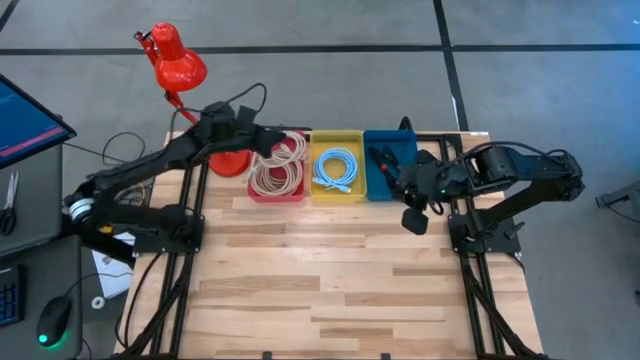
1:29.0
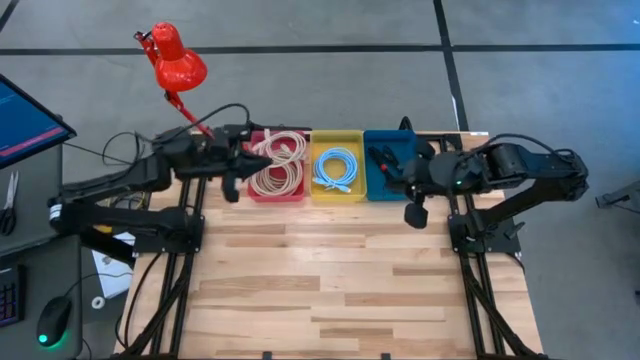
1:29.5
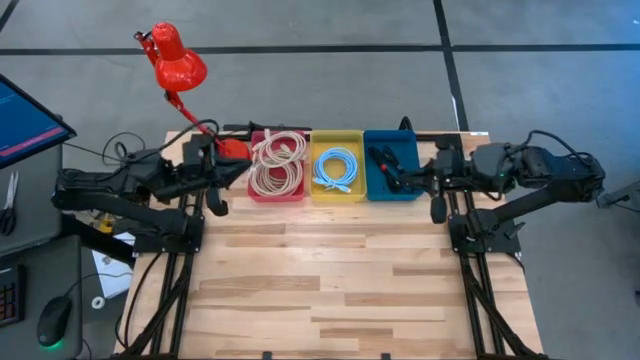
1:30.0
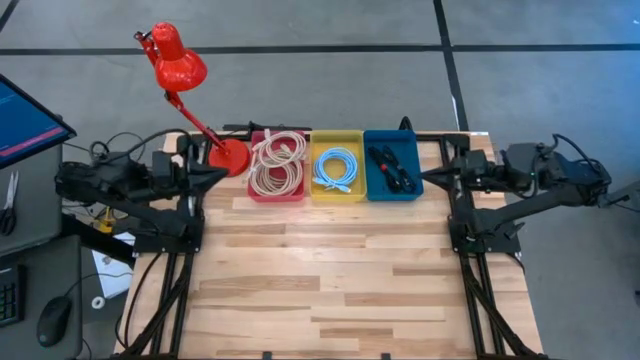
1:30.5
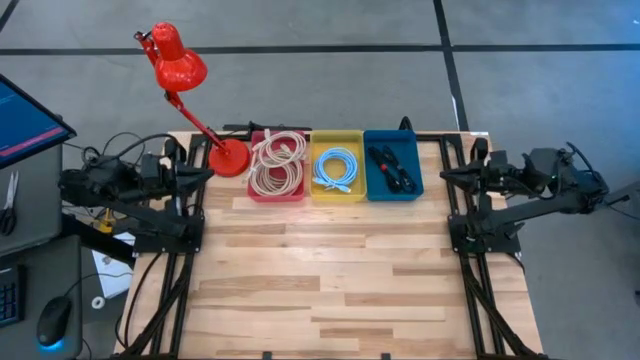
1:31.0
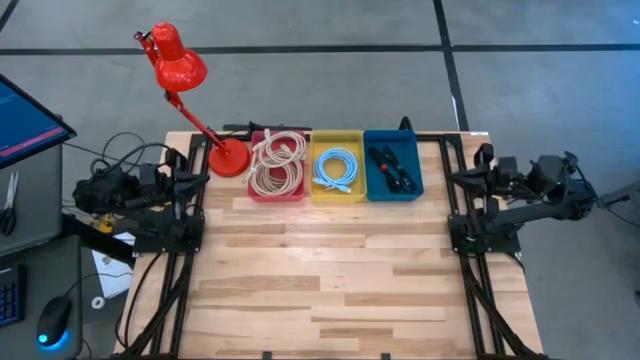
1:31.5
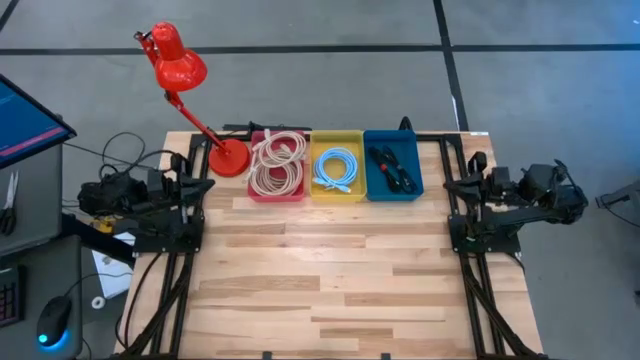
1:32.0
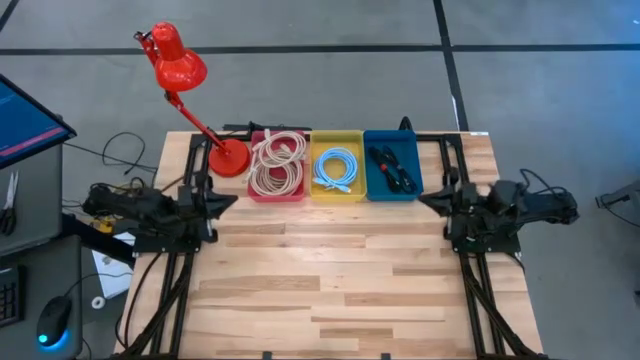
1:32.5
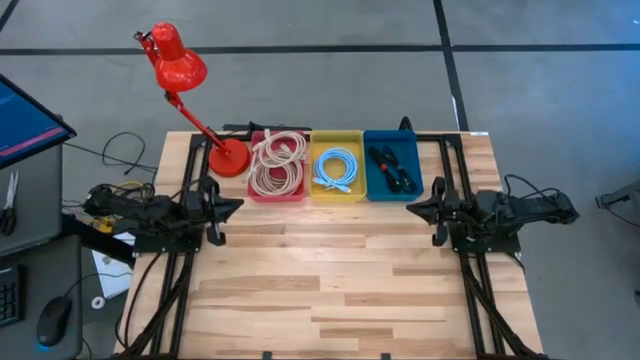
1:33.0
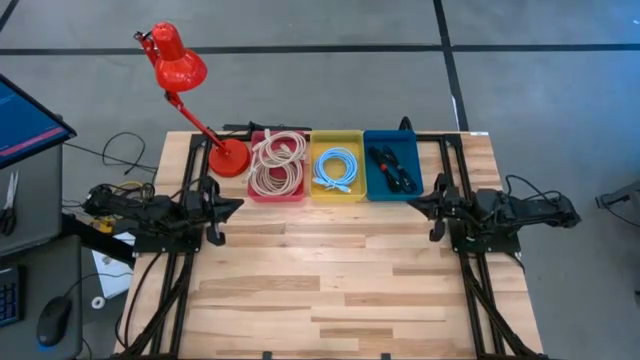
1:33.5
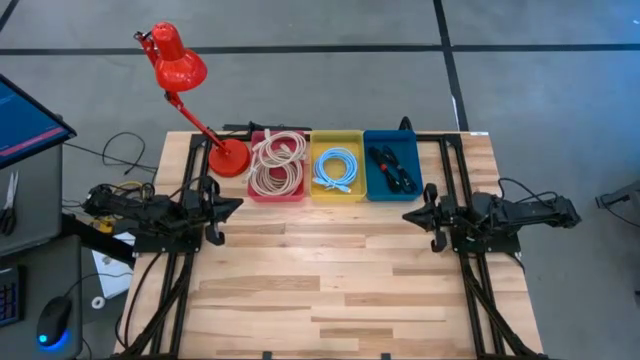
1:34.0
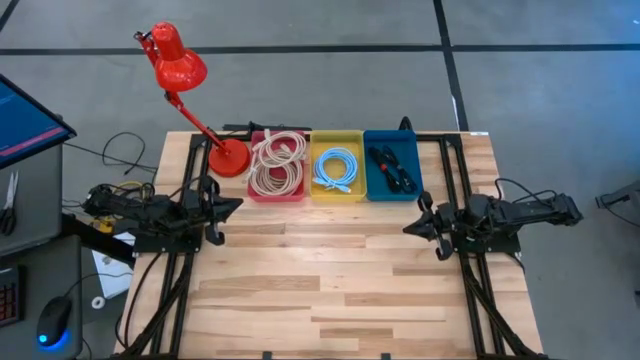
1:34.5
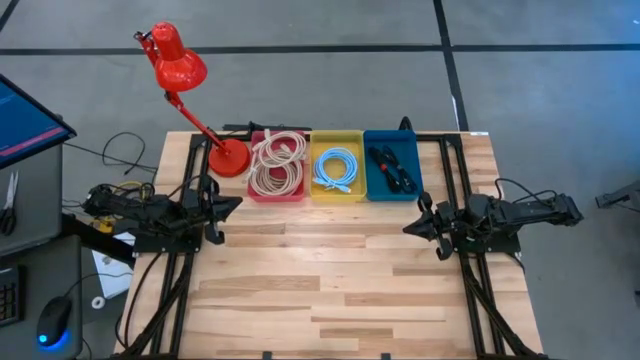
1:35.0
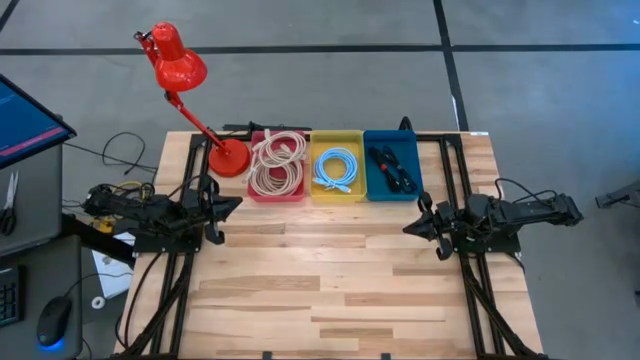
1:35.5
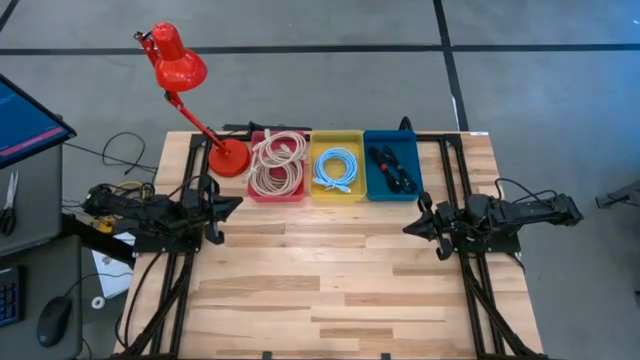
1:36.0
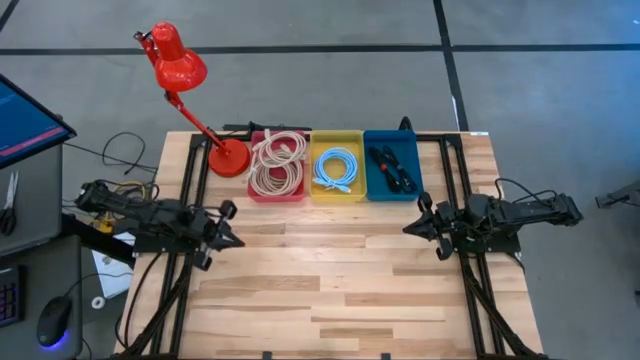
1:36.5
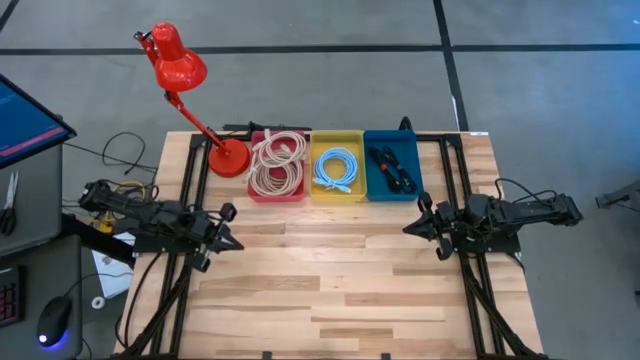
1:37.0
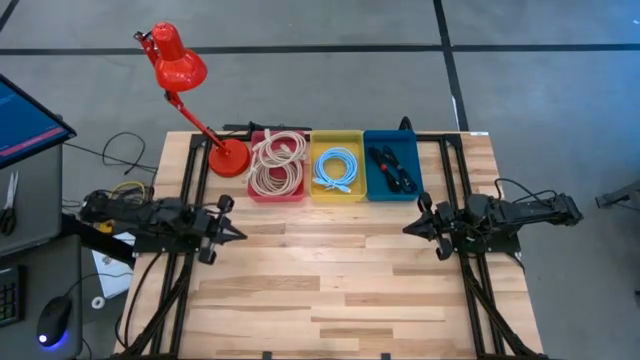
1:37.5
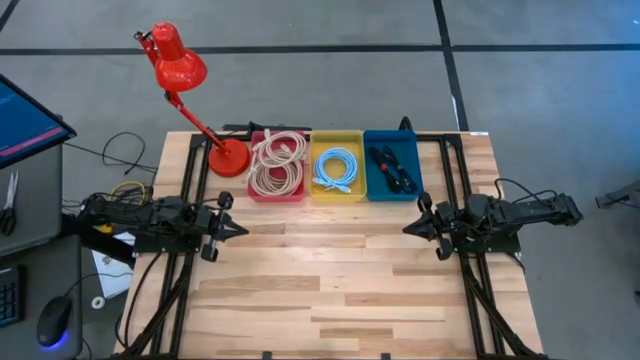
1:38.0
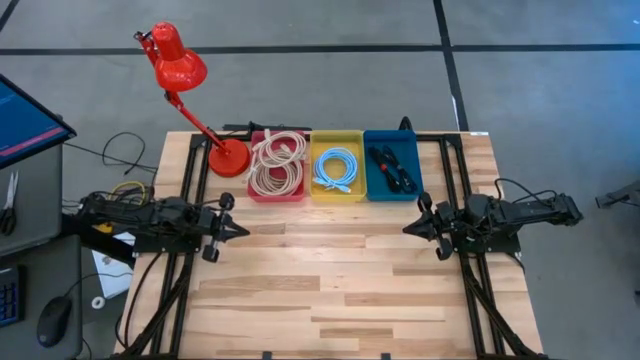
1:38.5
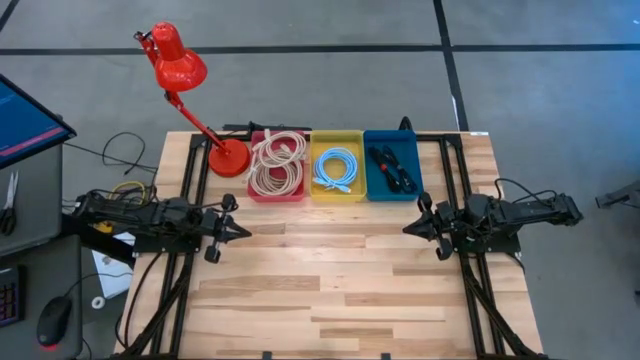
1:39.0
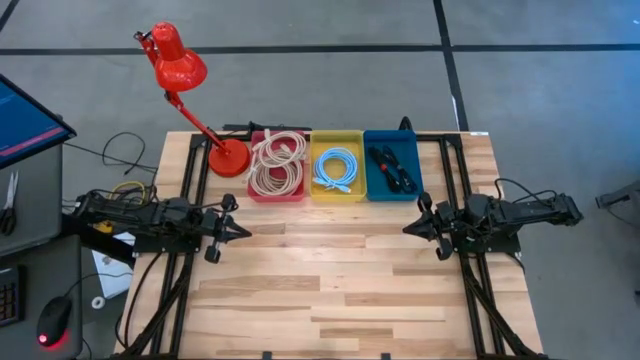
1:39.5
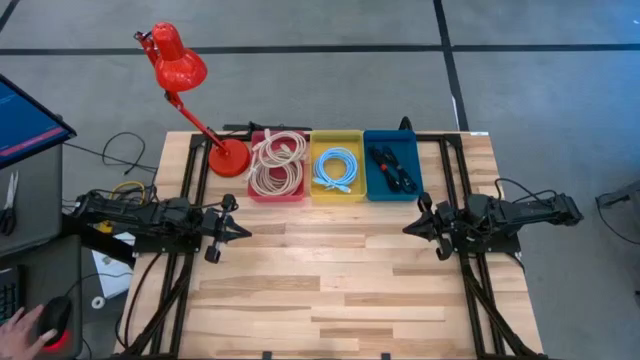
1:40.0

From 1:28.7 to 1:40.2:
Task: Pick & Place USB Port
Return to Home Position

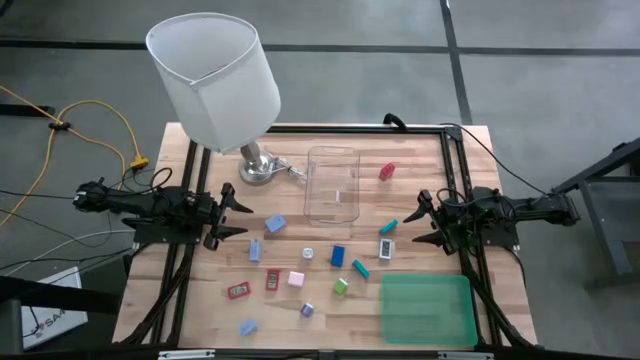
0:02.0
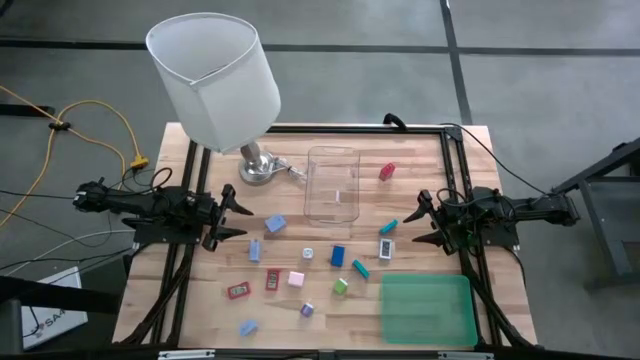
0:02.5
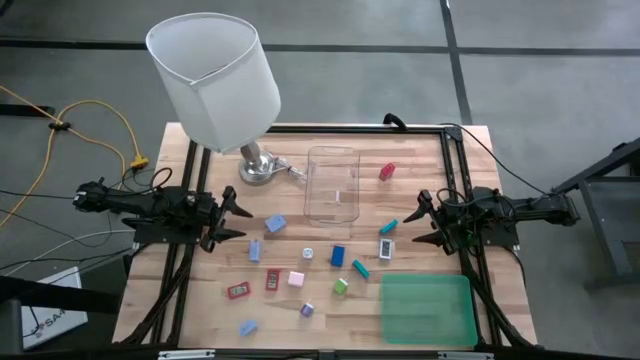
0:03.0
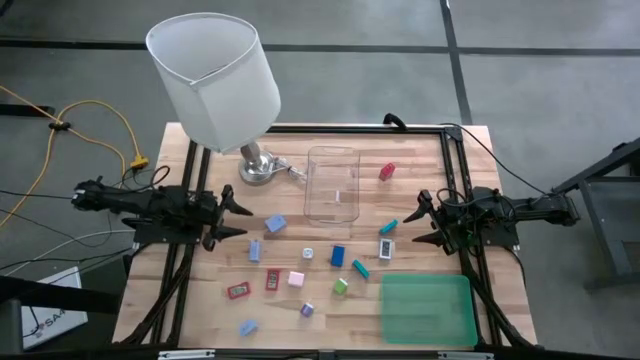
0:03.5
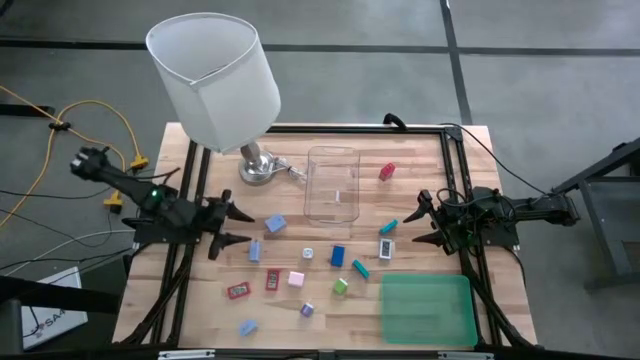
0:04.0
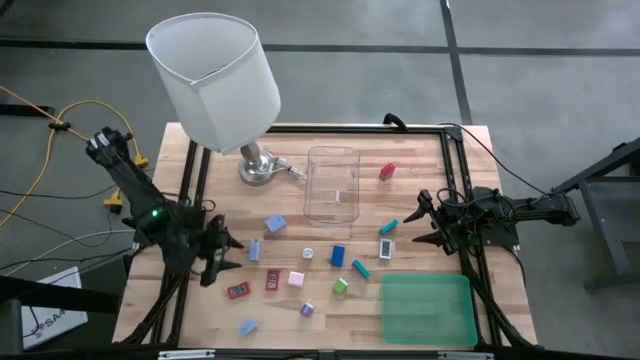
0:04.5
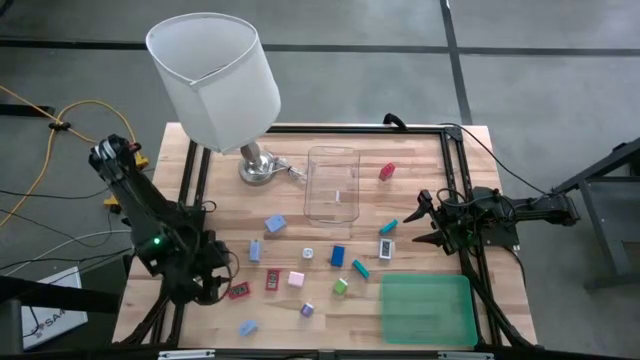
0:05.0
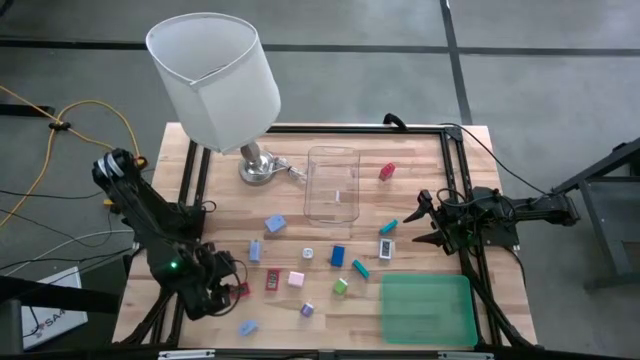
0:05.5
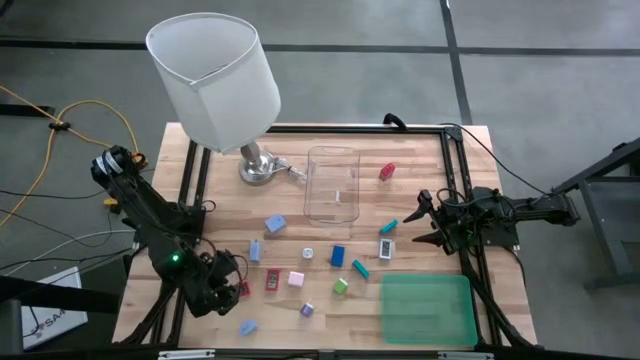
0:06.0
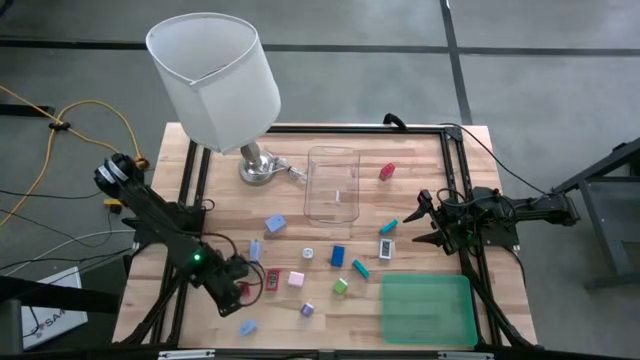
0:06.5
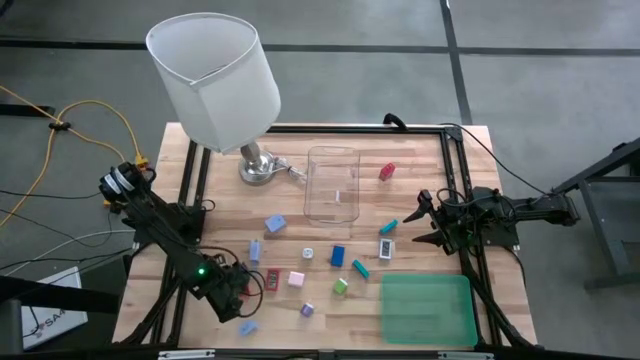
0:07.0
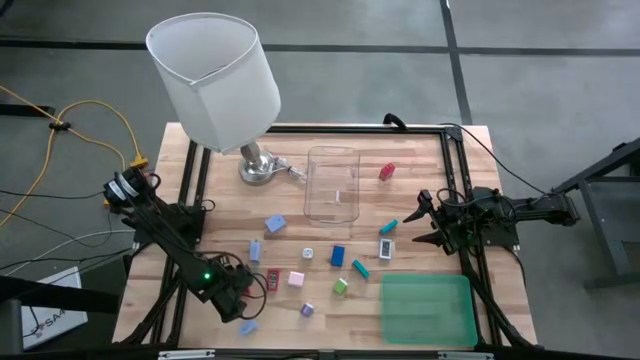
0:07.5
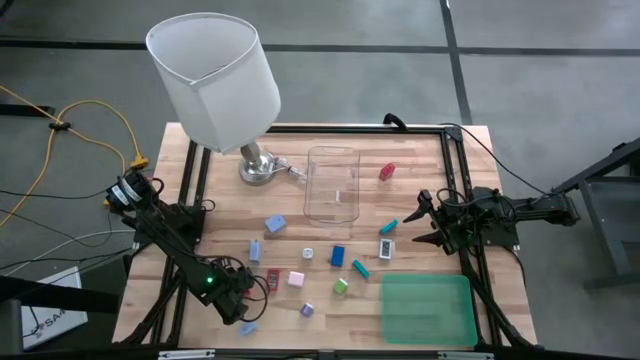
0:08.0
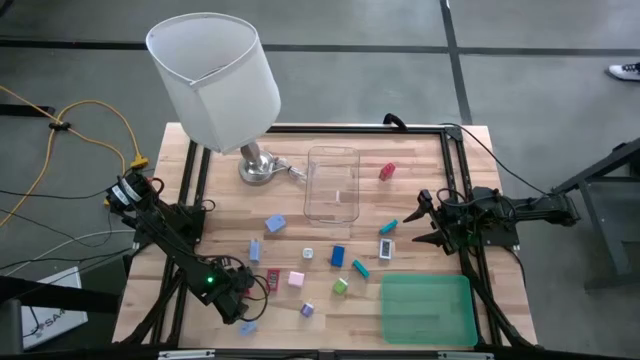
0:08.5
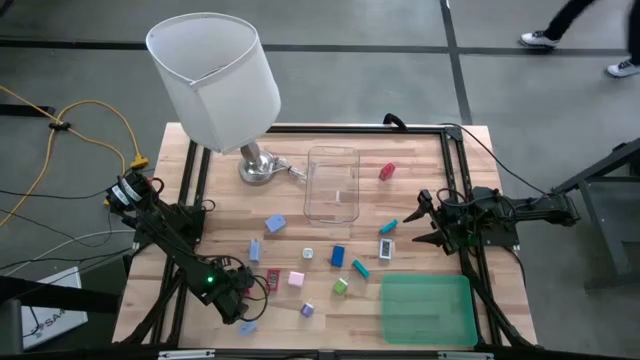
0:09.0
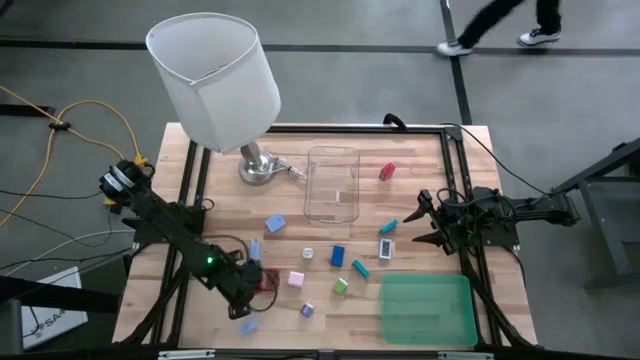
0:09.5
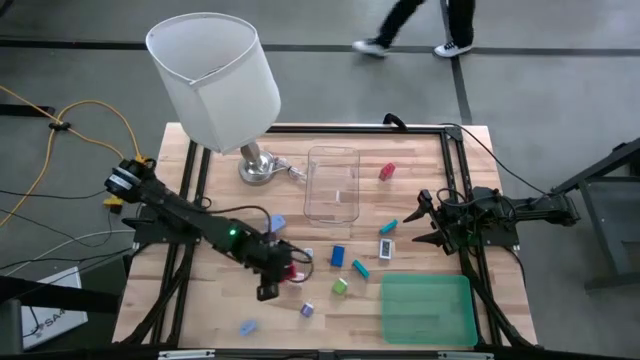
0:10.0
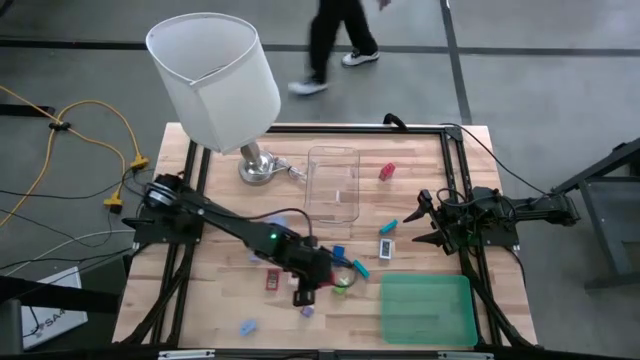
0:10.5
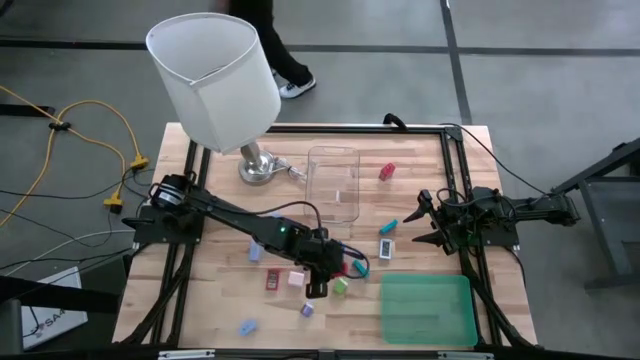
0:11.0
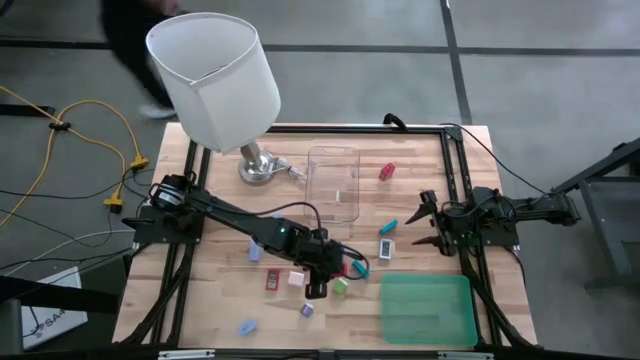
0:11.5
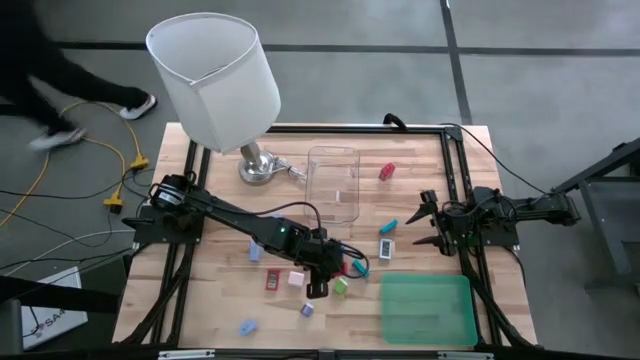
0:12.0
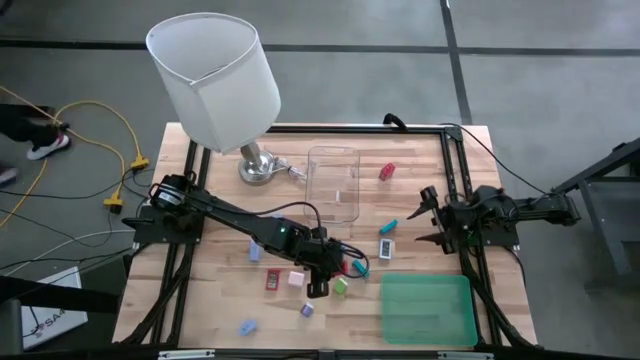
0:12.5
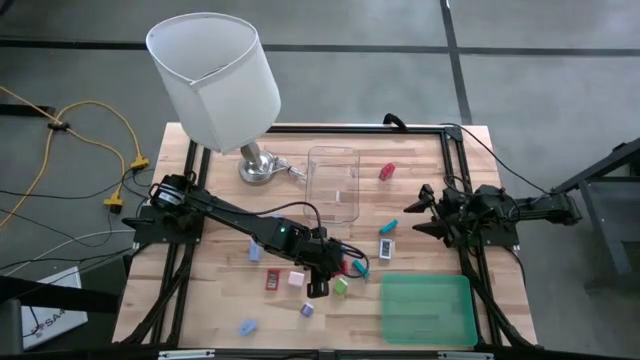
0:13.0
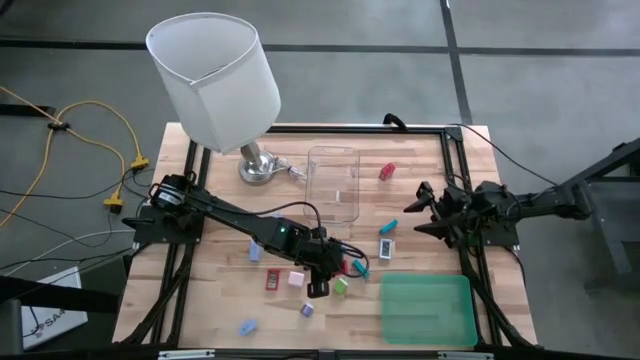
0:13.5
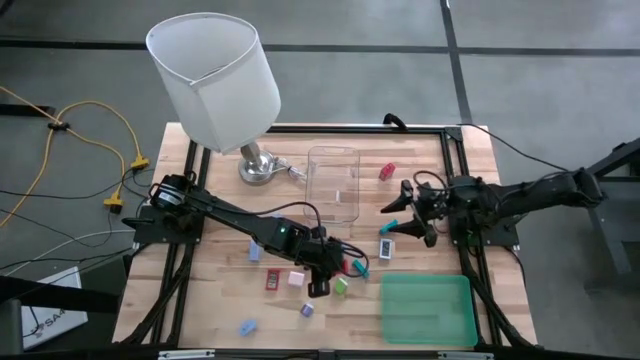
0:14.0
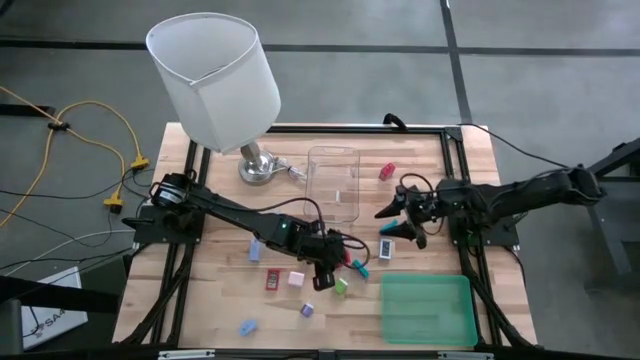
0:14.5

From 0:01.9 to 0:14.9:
Task: Pick & Place Office items
Put the left red digital clock into the green bin
